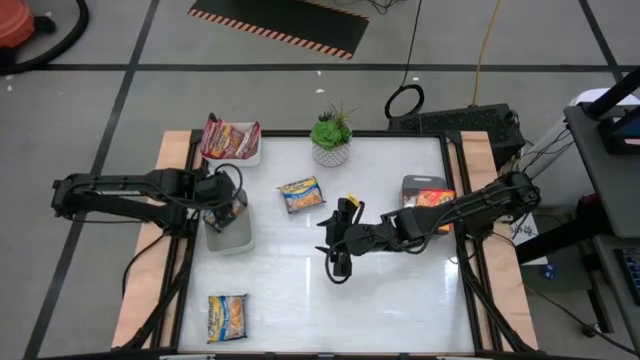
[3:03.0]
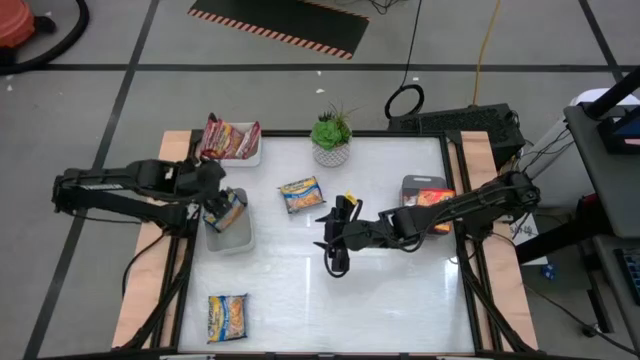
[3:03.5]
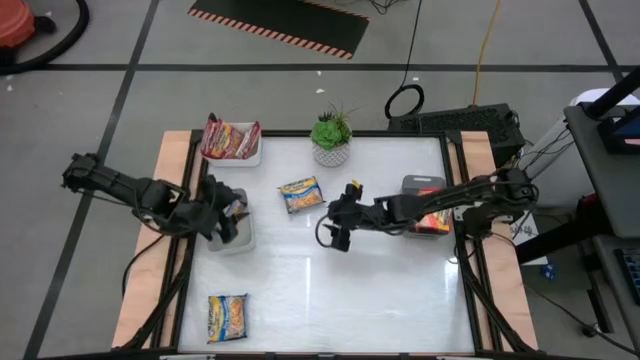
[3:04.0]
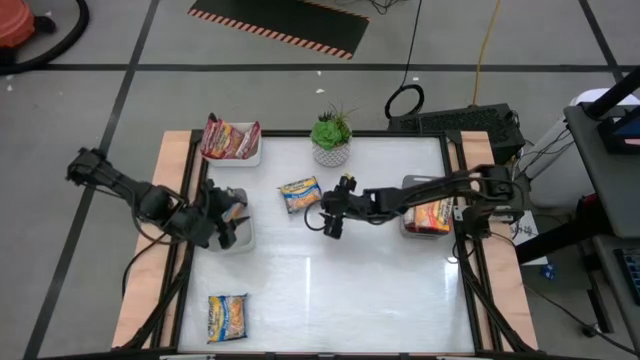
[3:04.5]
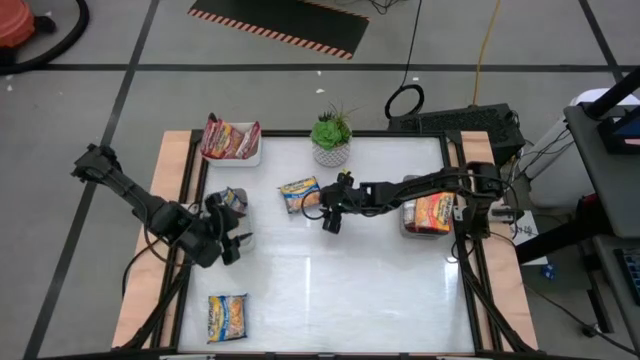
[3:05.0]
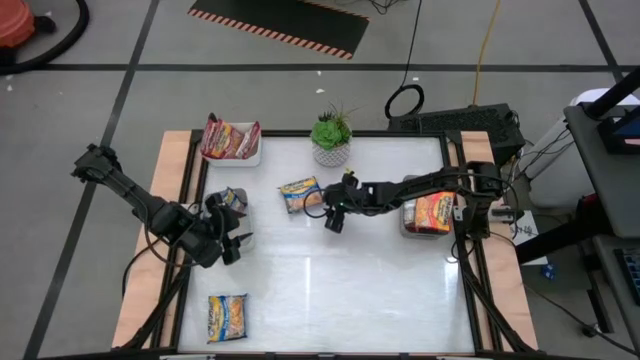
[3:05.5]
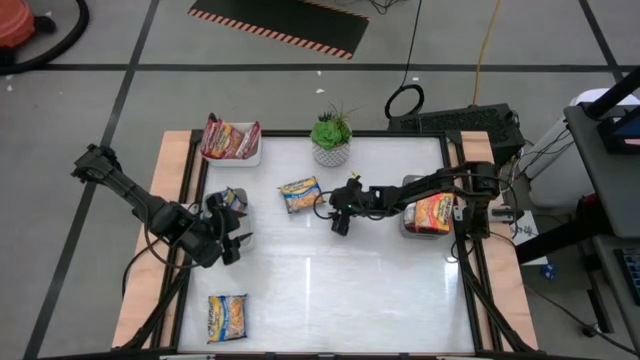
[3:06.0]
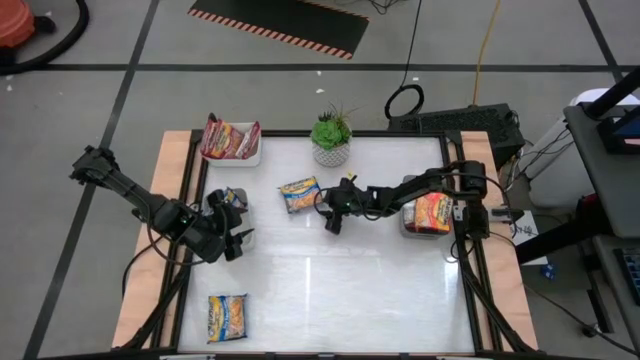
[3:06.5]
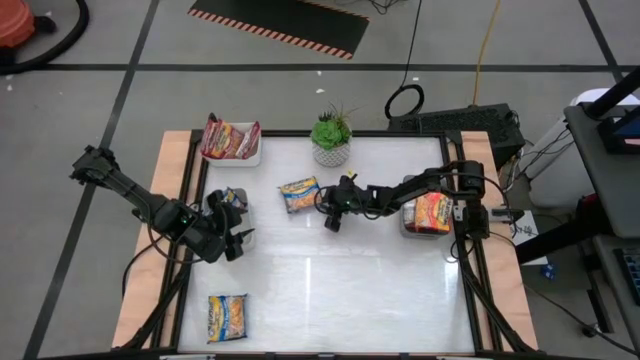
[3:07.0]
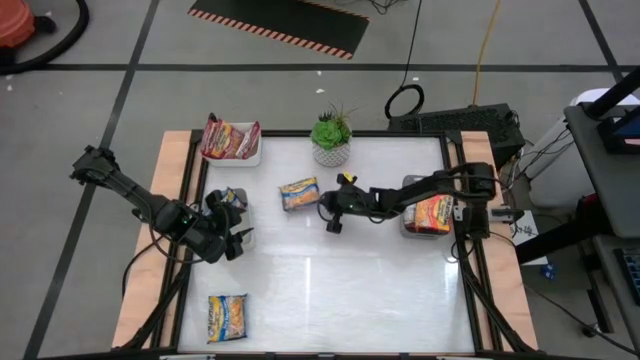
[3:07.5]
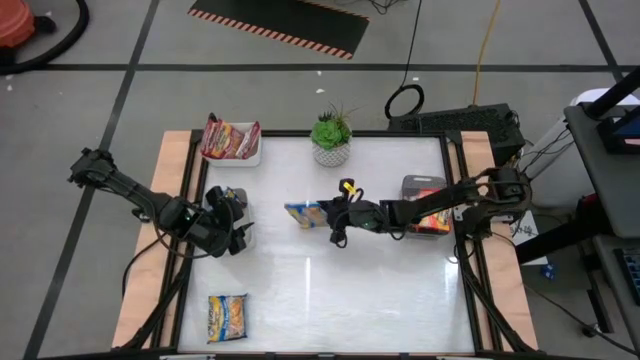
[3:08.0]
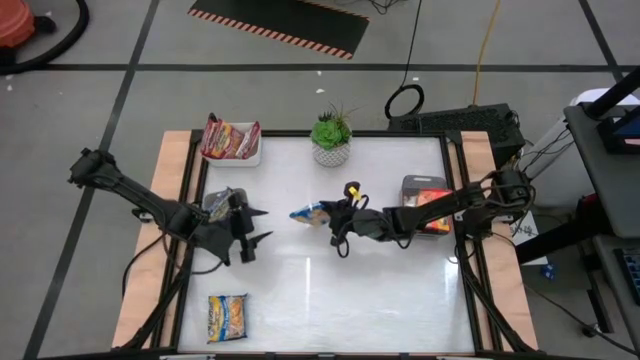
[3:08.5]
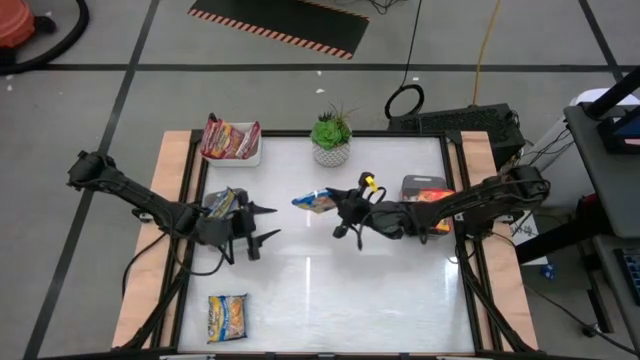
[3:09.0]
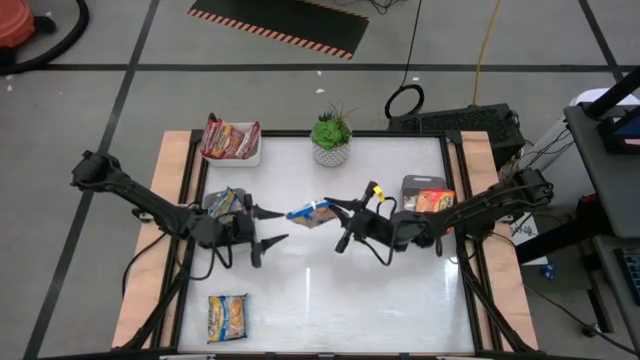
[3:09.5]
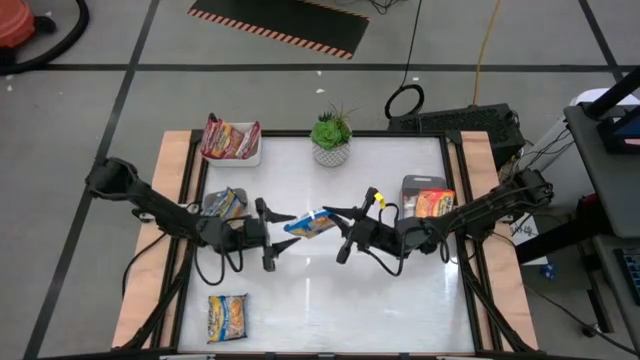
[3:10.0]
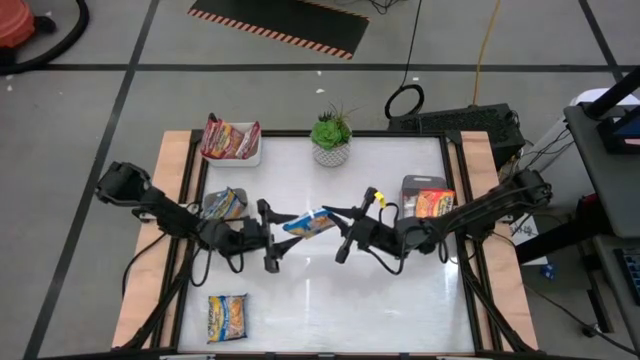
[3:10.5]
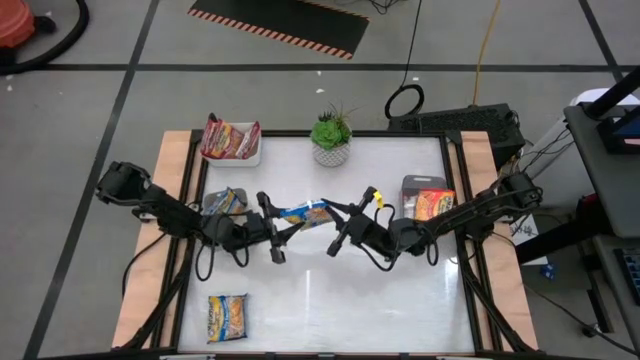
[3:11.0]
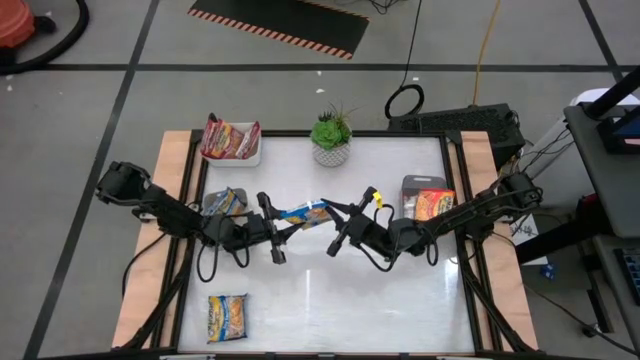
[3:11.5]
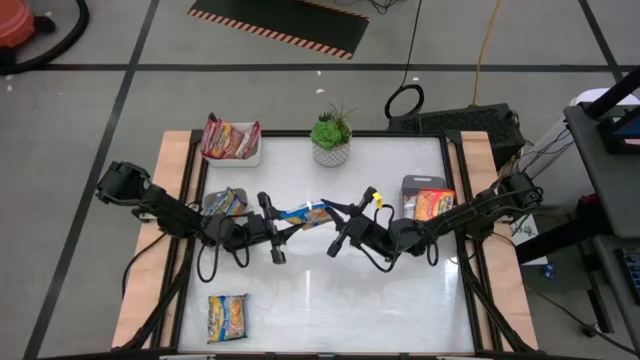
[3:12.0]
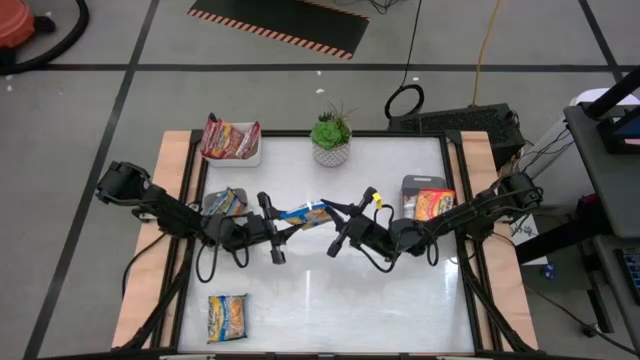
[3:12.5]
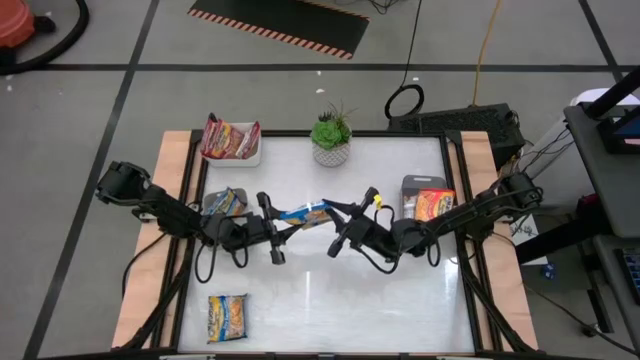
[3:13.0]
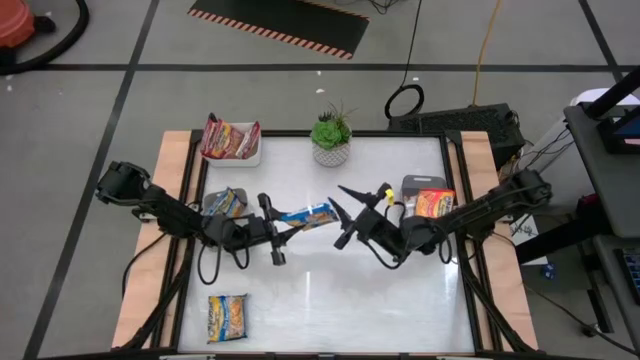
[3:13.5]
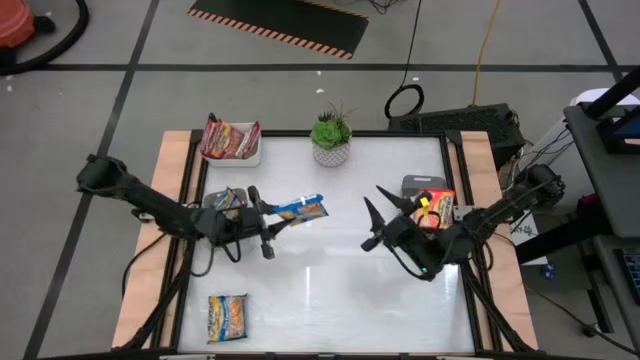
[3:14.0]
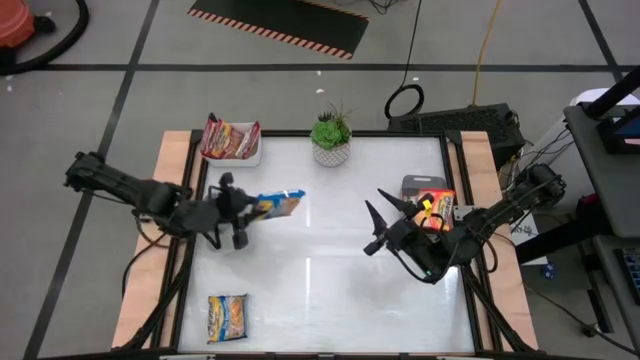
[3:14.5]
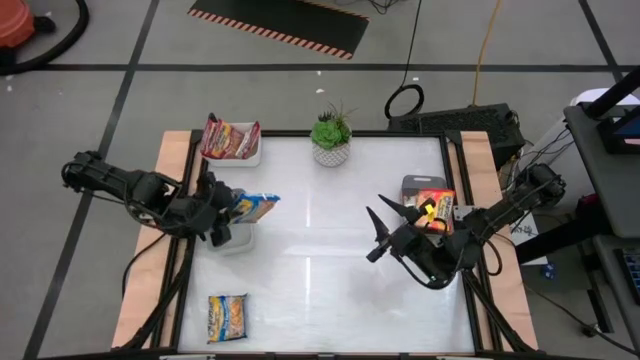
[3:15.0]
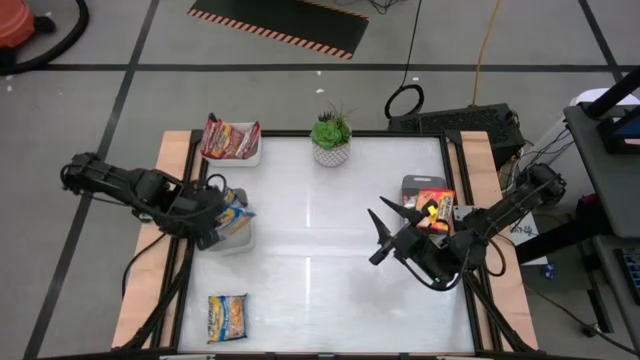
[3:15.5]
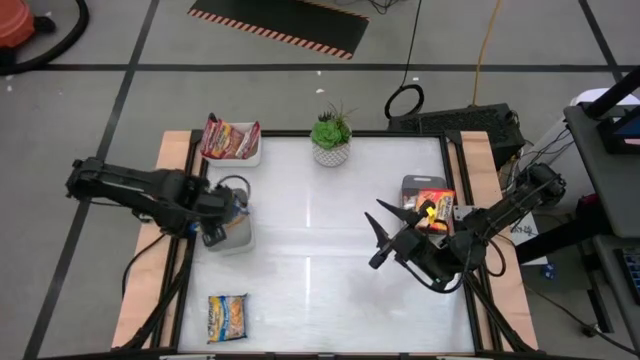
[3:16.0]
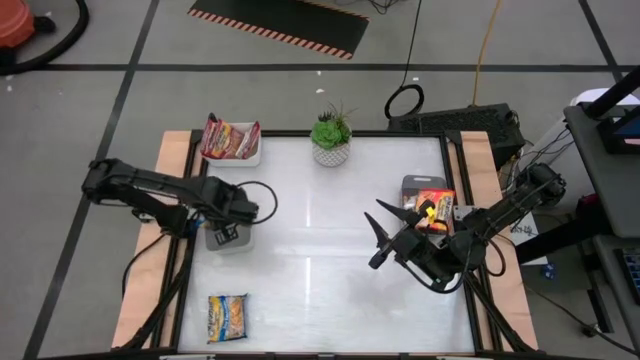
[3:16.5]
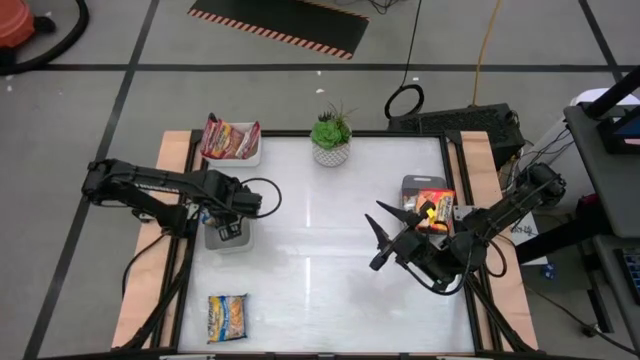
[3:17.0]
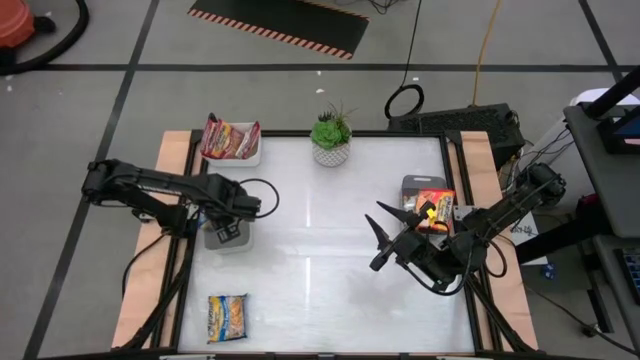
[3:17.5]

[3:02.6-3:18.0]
Task: Sort Maruchan noodles
Put the top blue noodle pack into the gray bin

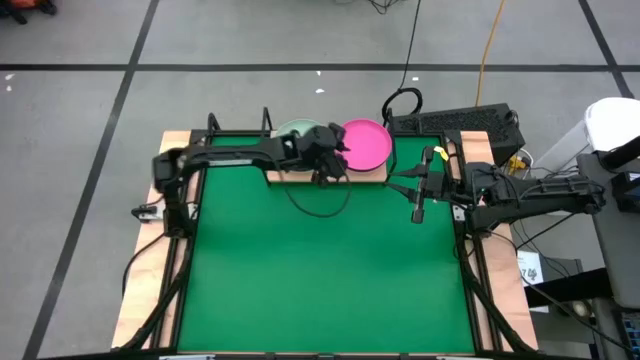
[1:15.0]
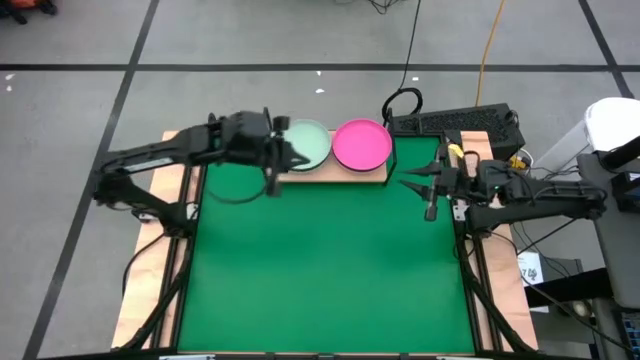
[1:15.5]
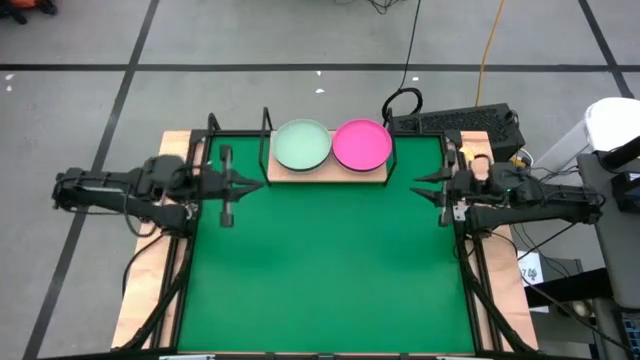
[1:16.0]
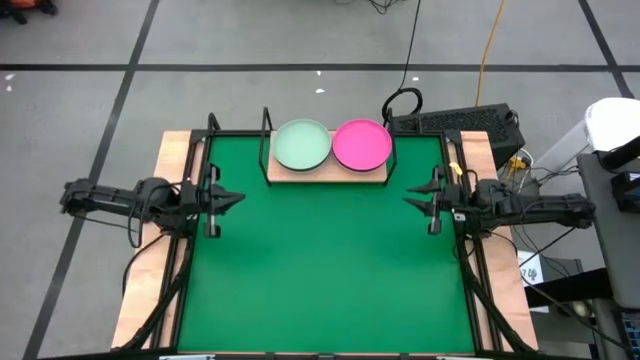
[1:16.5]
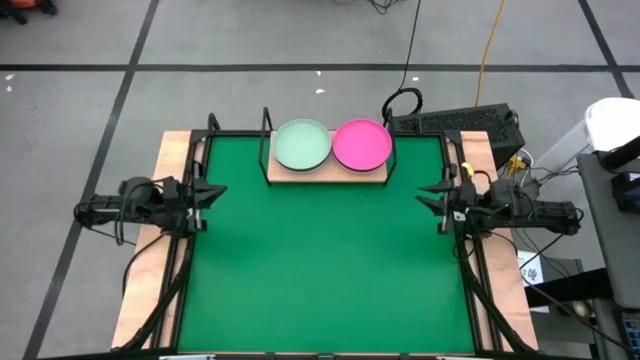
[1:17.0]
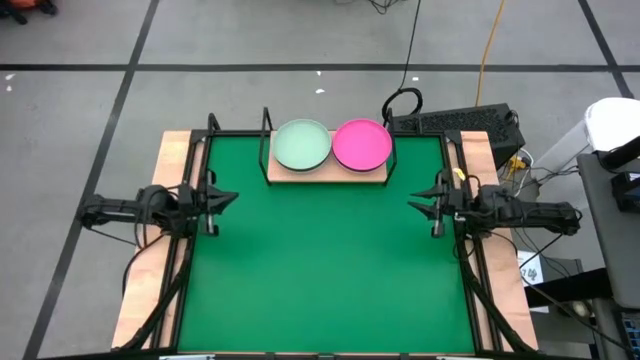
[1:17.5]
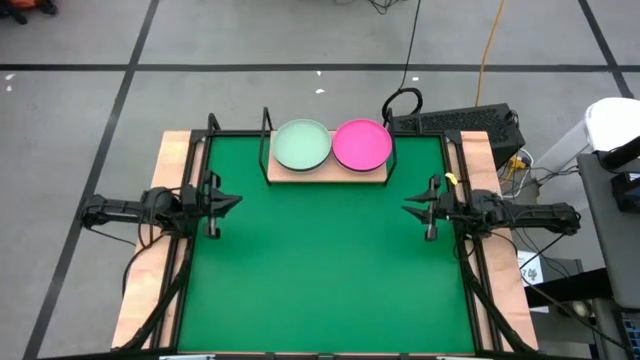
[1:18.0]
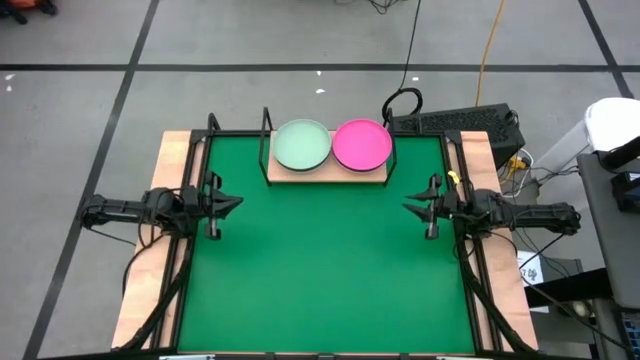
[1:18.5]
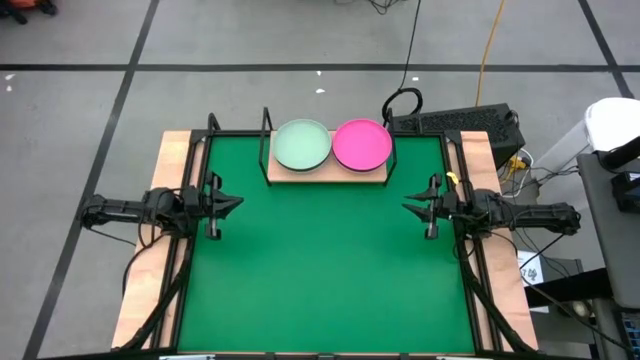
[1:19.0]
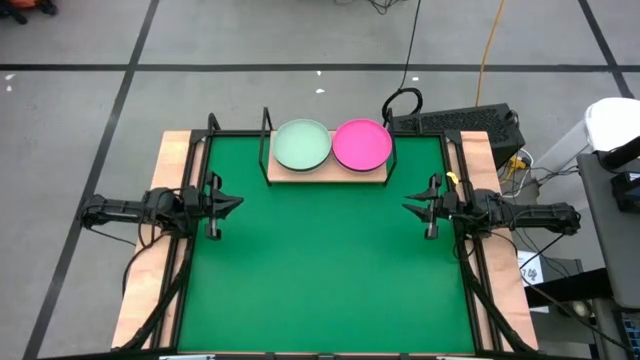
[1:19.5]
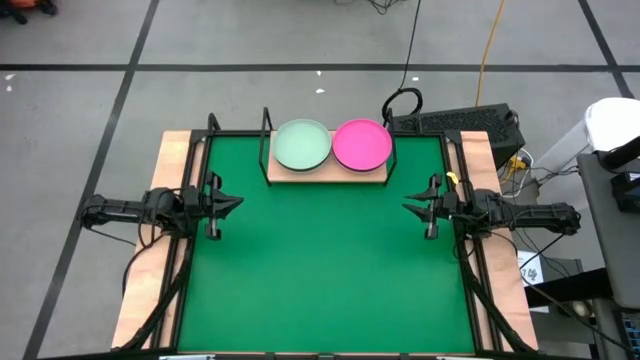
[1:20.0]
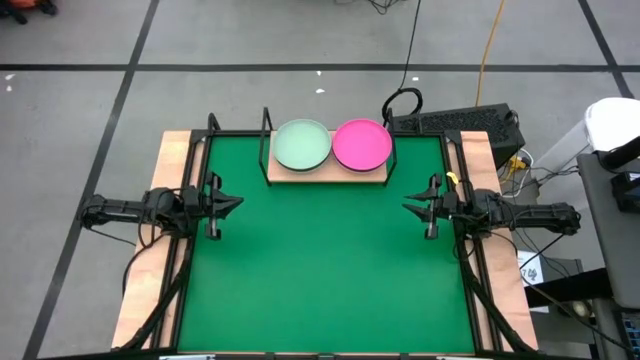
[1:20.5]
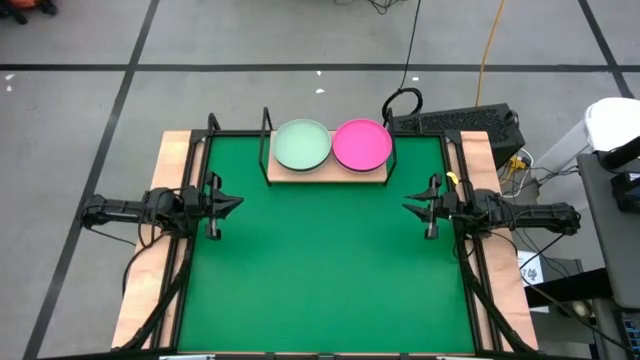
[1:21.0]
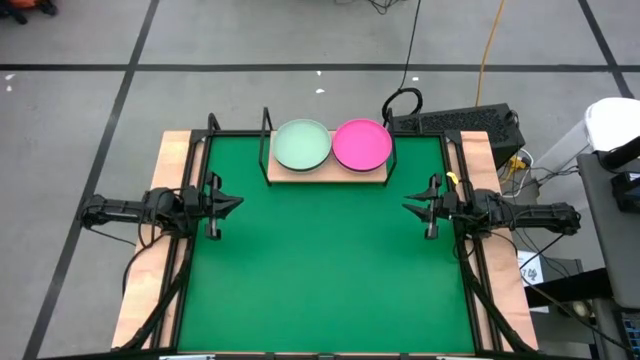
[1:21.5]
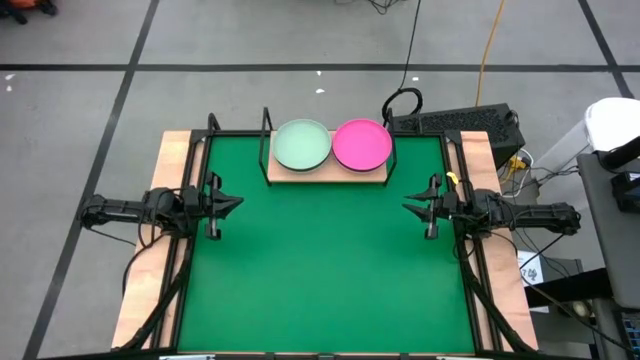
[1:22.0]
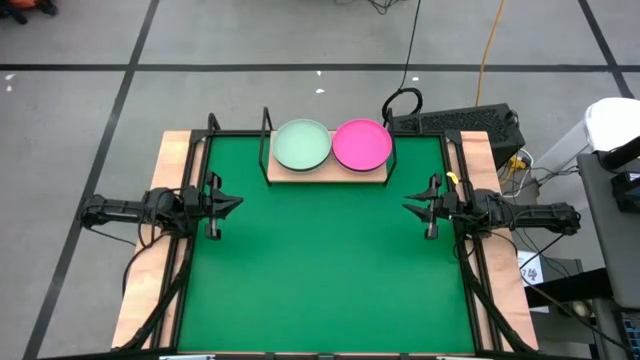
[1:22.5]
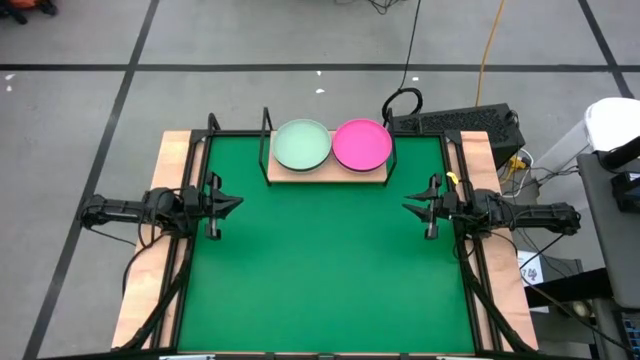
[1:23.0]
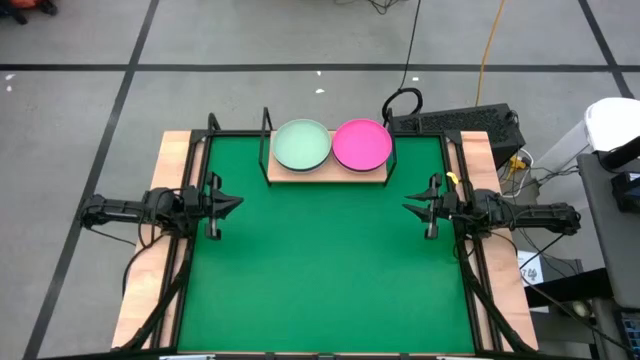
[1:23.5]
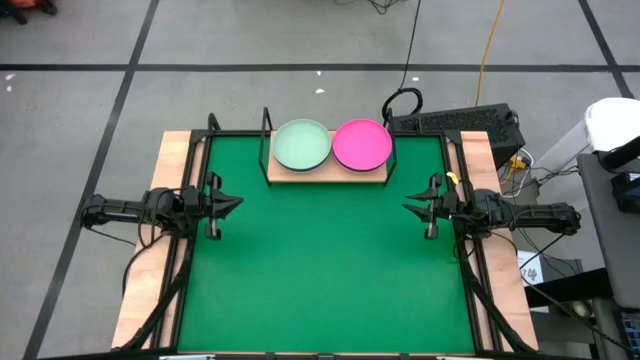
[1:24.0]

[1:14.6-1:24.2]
Task: Place and stack plates onto a shelf
Return to Home Position
